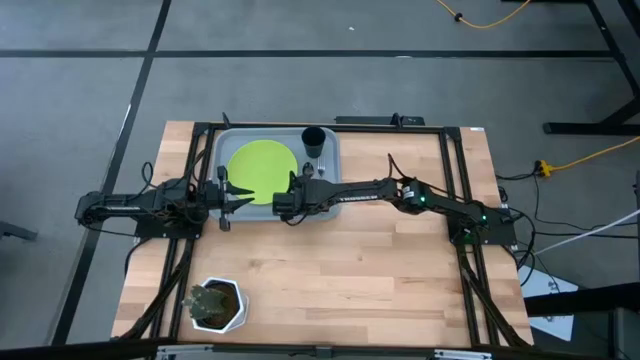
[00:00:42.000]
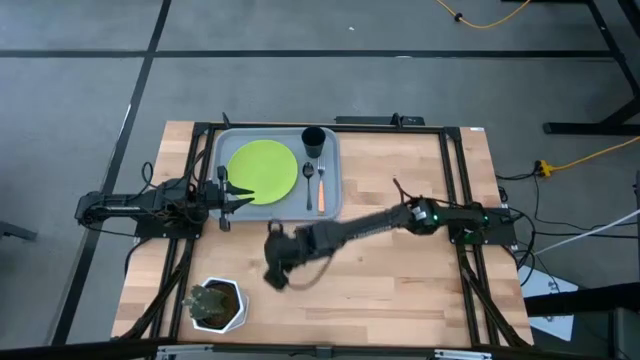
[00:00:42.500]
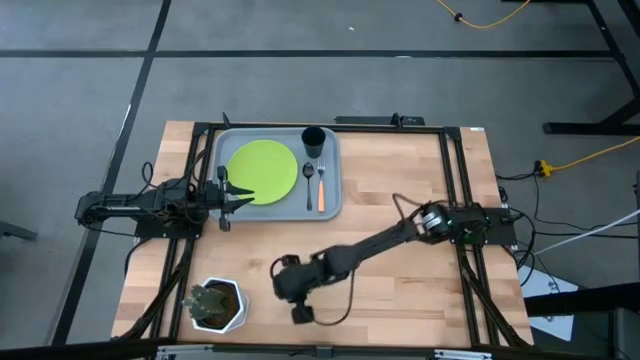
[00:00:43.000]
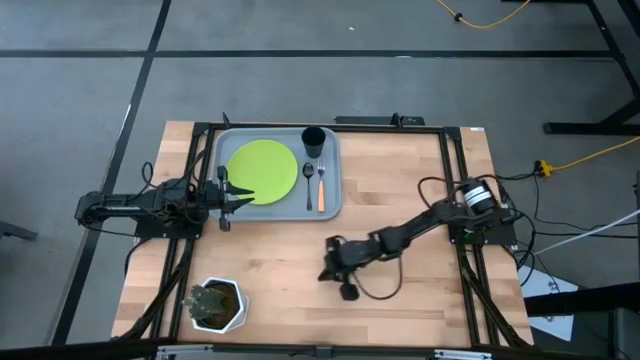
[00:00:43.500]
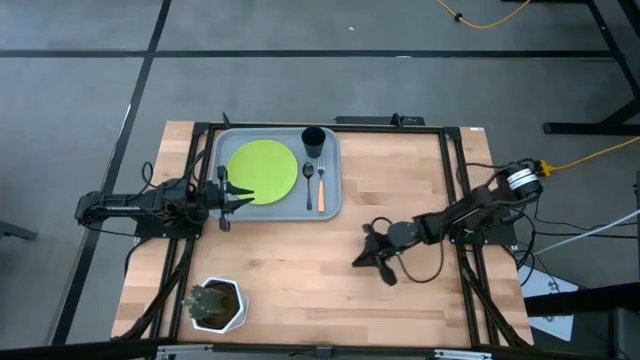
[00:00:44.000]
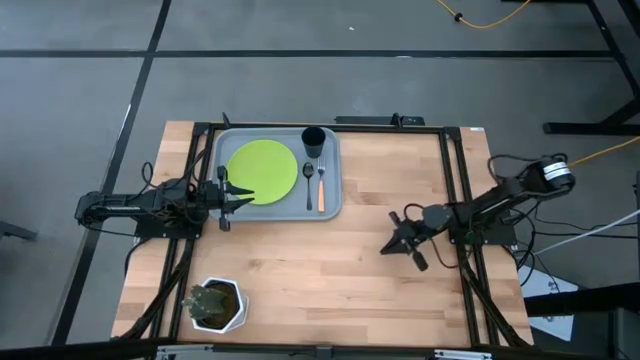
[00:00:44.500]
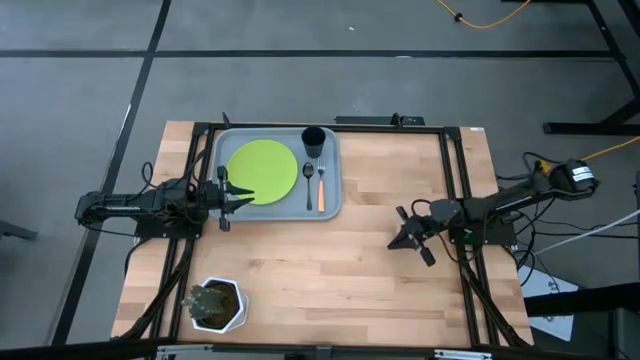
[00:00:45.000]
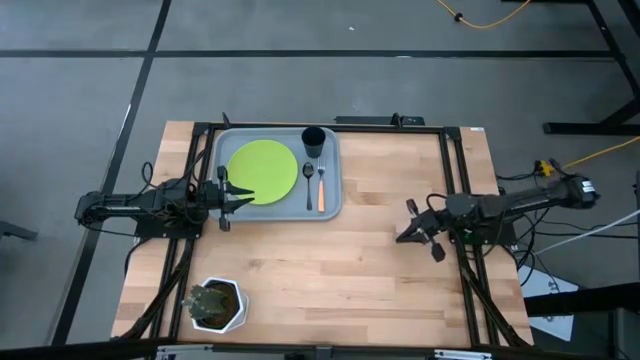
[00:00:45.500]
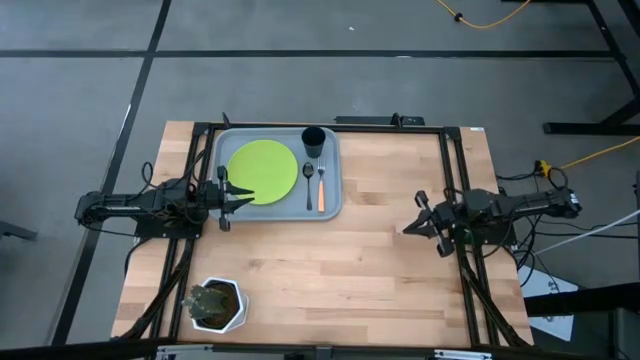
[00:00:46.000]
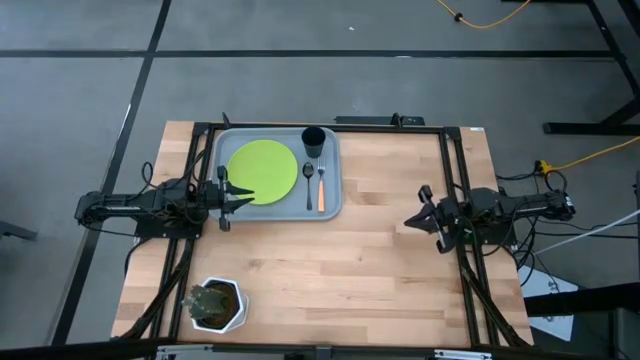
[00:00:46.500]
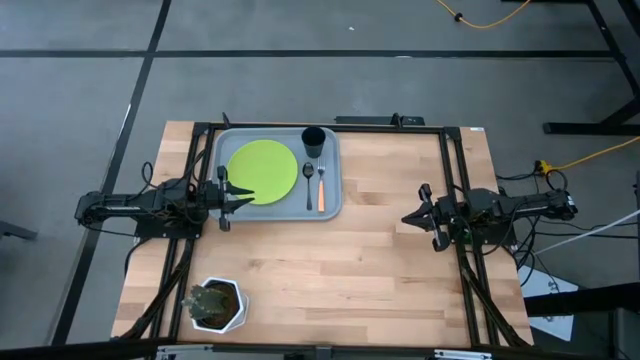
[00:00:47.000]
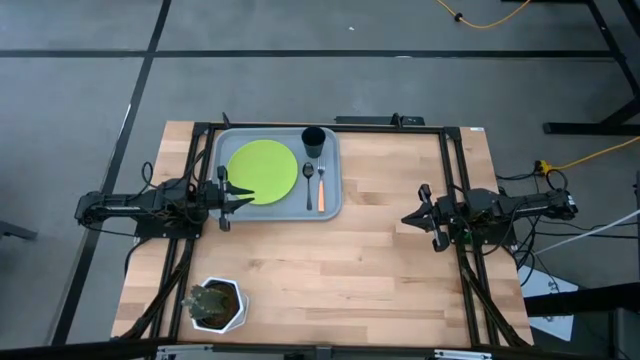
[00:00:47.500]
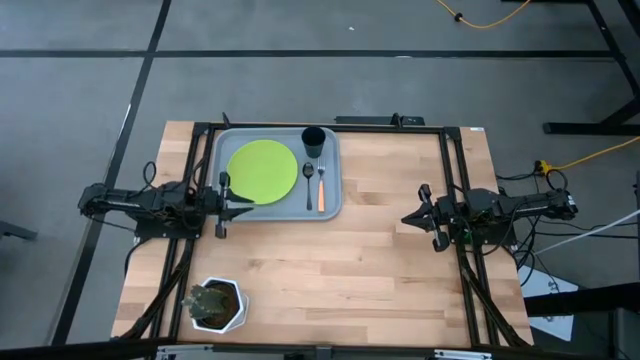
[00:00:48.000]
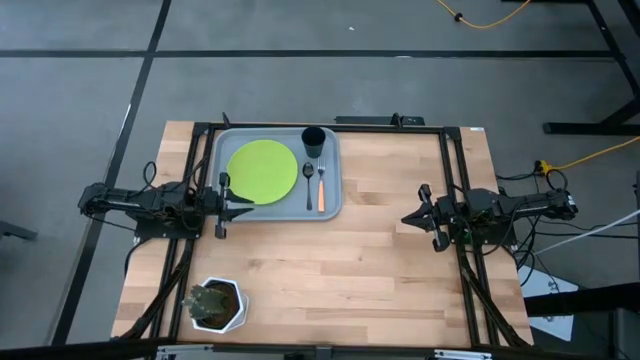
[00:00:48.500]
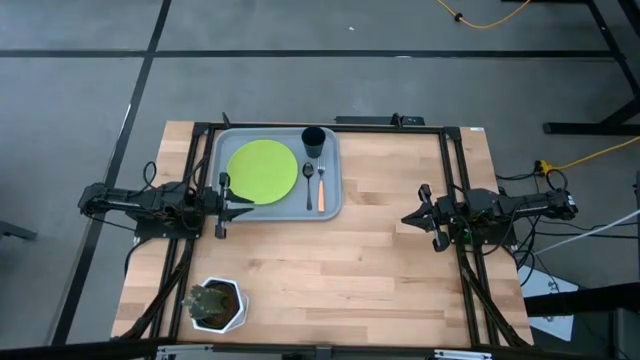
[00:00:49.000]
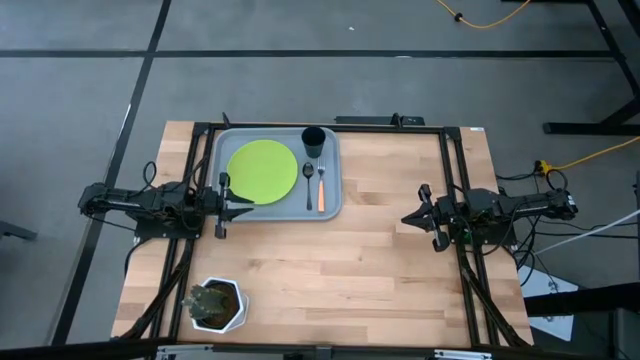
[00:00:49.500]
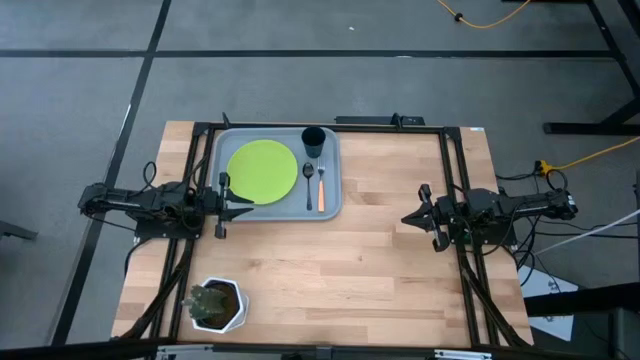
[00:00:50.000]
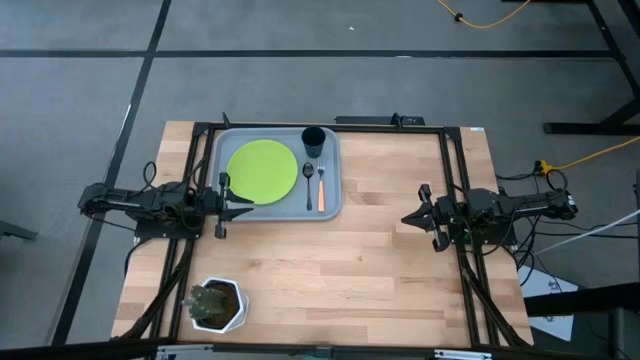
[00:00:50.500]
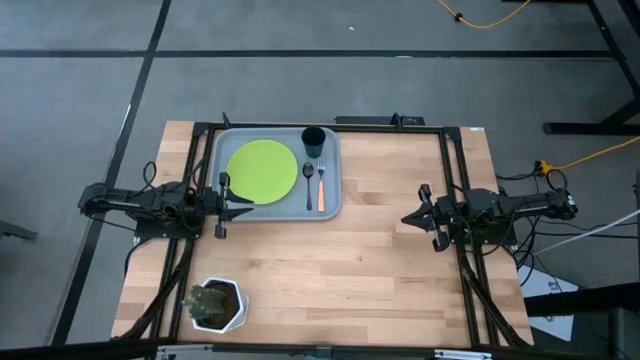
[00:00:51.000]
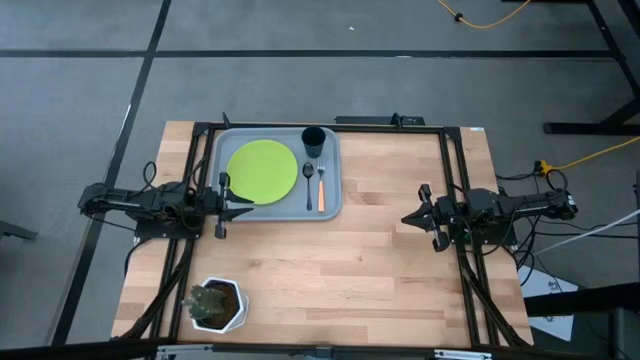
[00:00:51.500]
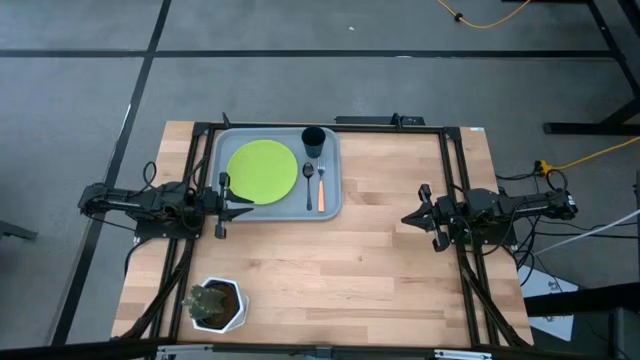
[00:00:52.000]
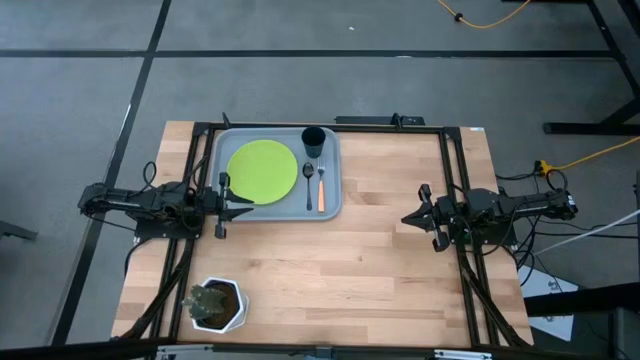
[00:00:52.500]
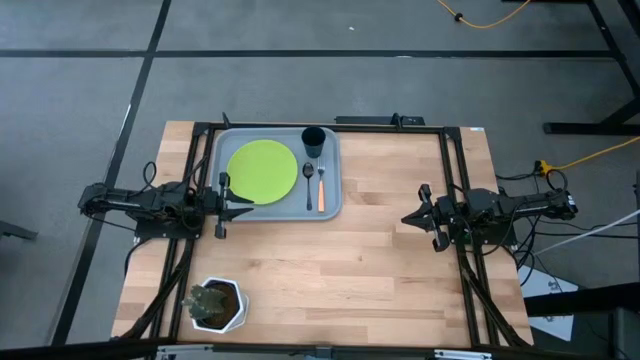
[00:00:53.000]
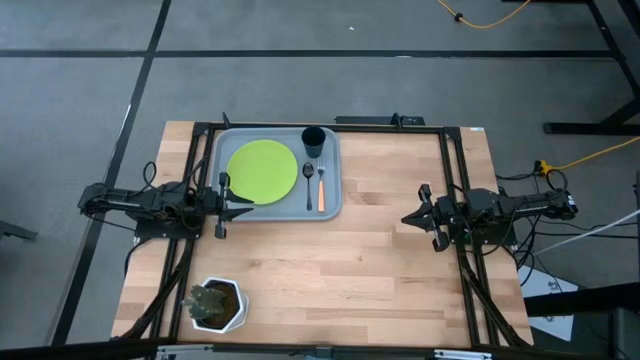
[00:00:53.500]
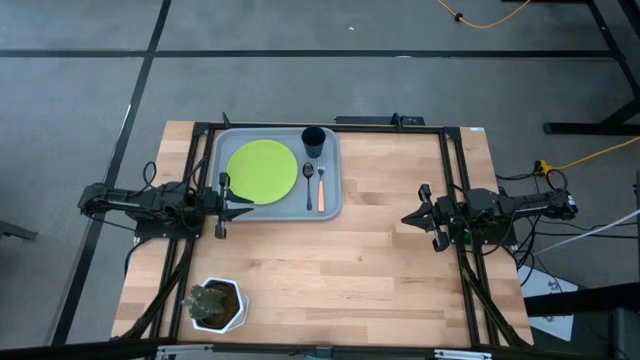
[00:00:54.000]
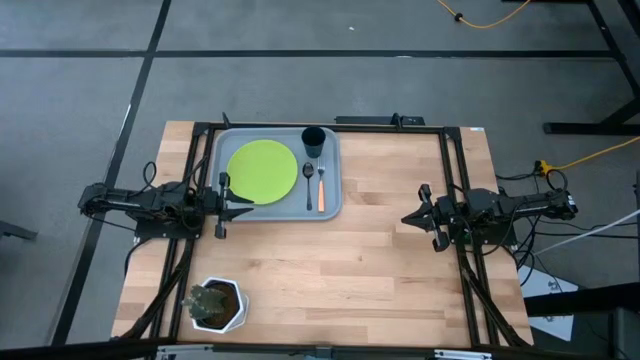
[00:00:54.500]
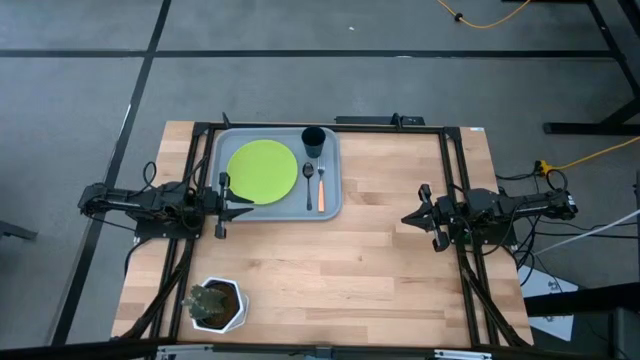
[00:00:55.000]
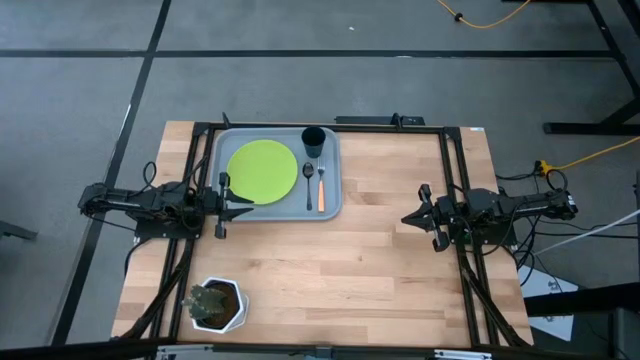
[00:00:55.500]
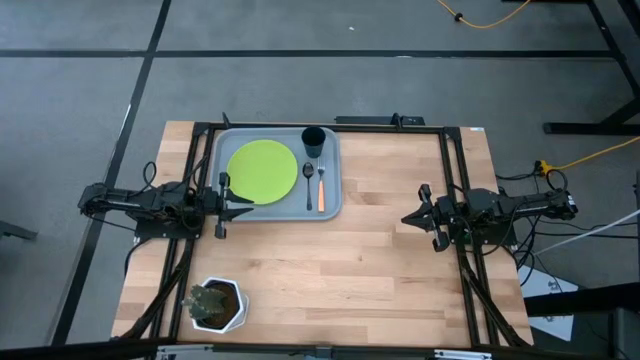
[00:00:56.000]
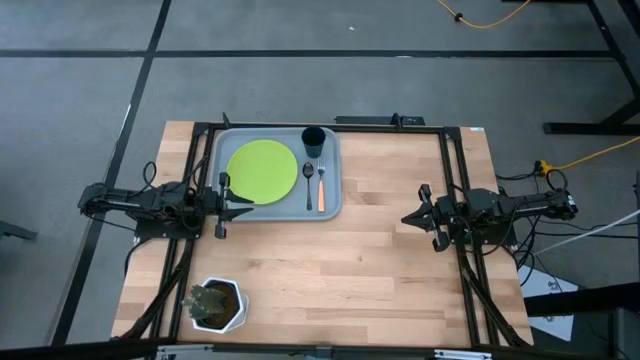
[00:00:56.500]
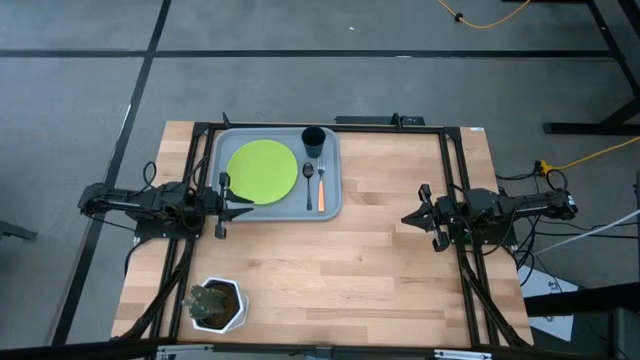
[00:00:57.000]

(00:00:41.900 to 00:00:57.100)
Task: Pick and place plate/cup/fork/spoon on tray
Return to Home Position

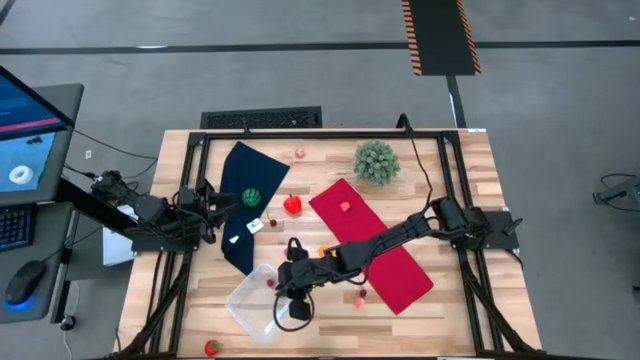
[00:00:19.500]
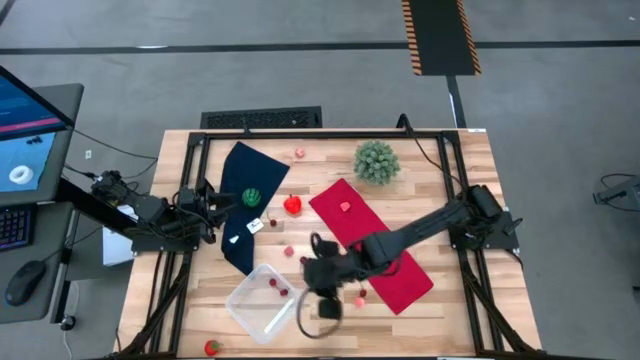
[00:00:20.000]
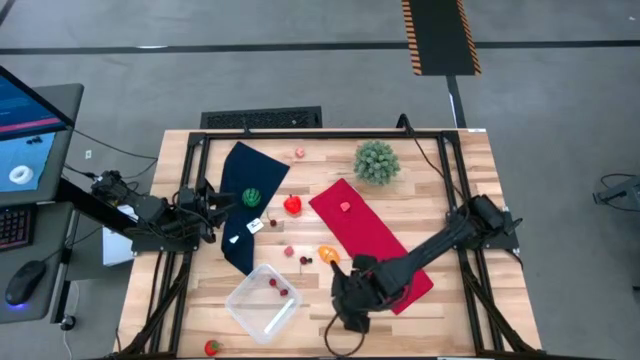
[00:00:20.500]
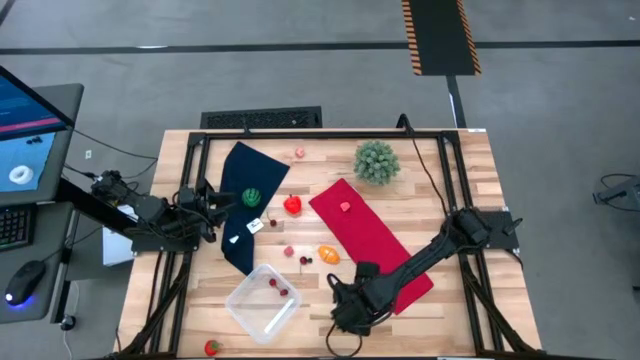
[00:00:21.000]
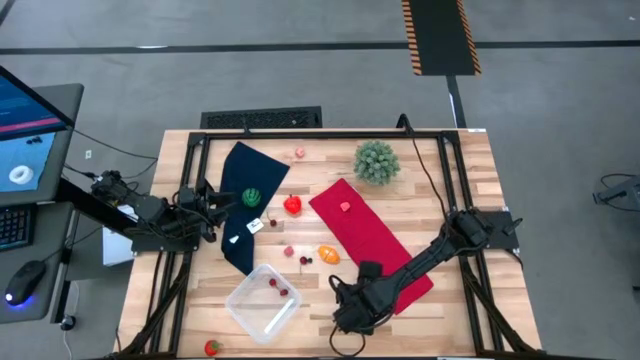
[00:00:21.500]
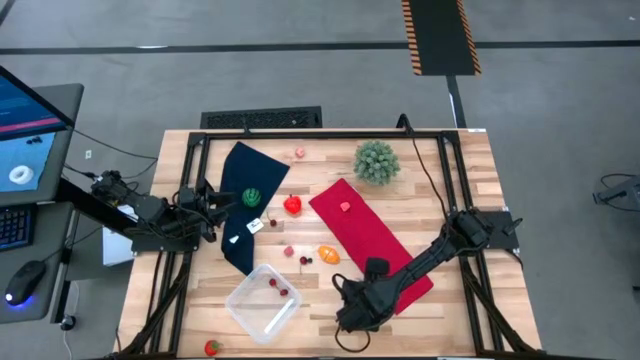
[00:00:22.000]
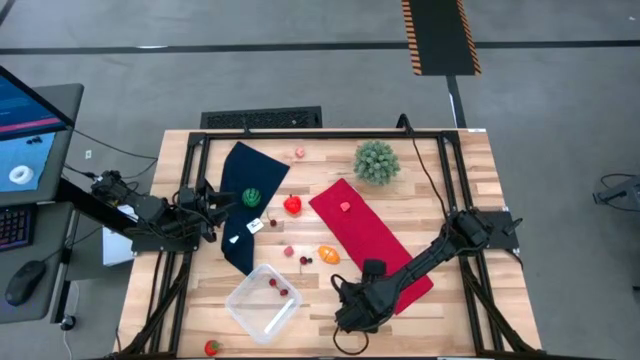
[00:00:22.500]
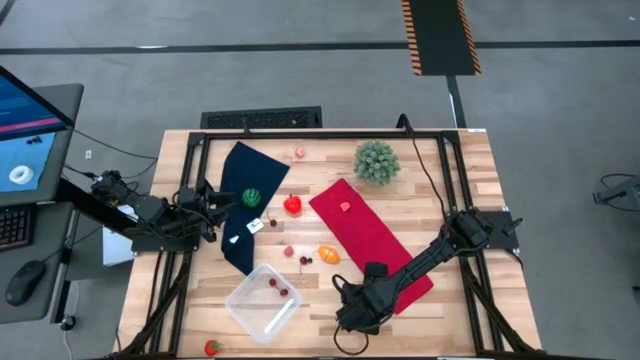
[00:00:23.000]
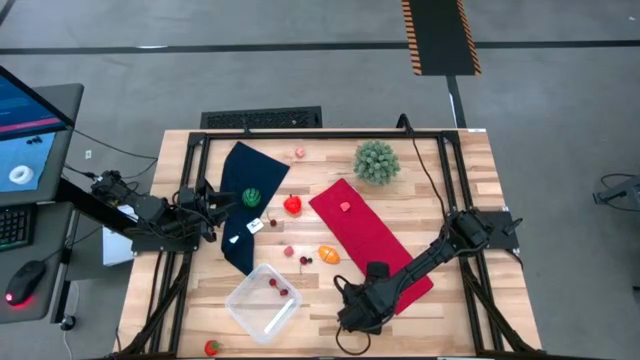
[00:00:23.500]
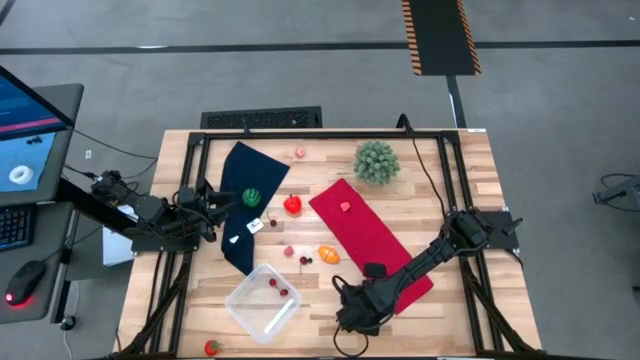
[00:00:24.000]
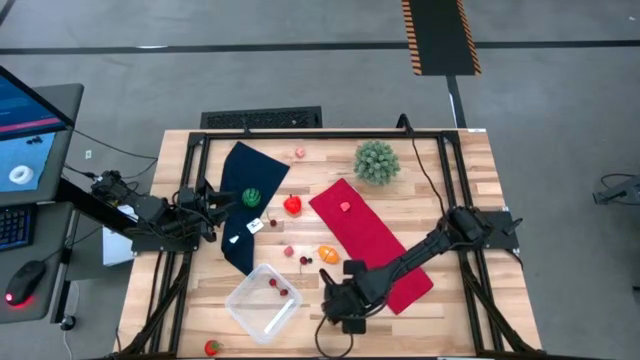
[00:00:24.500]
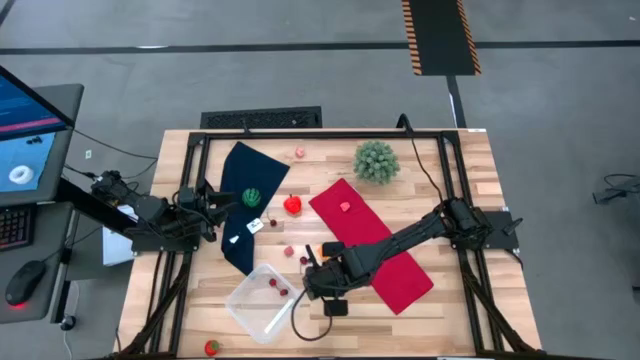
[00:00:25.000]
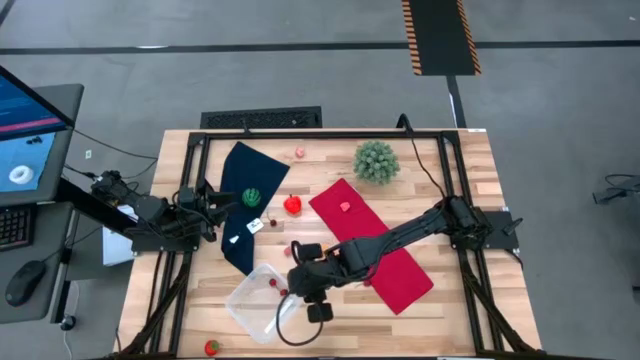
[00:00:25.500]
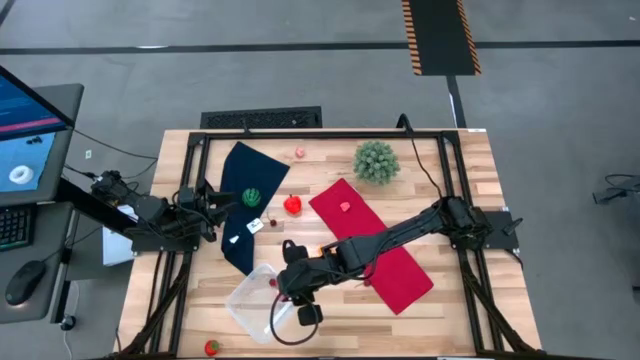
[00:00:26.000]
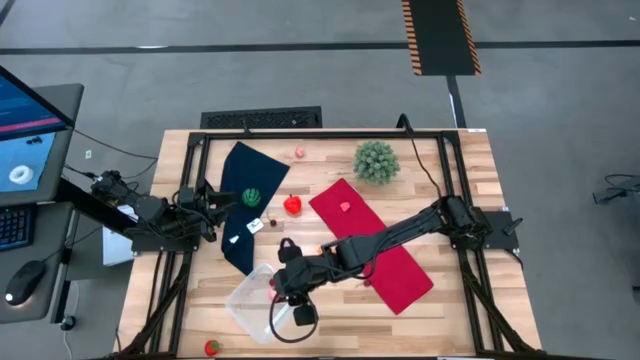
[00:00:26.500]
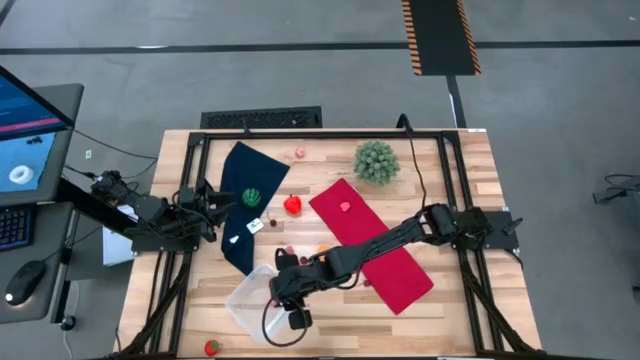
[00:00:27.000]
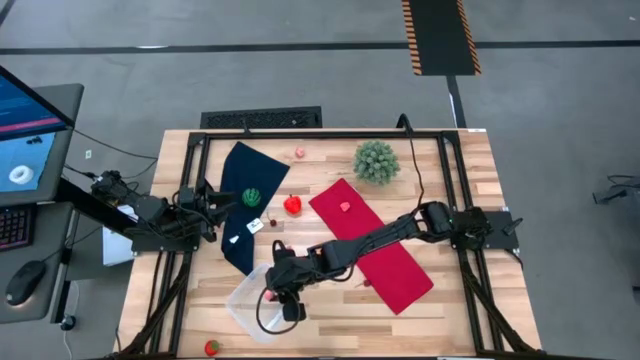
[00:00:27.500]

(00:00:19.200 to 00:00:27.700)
Task: Pick and placing Produce into tupperware
Put the peach into the transparent bin
